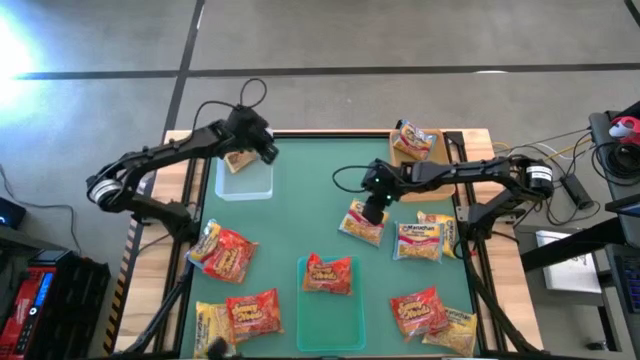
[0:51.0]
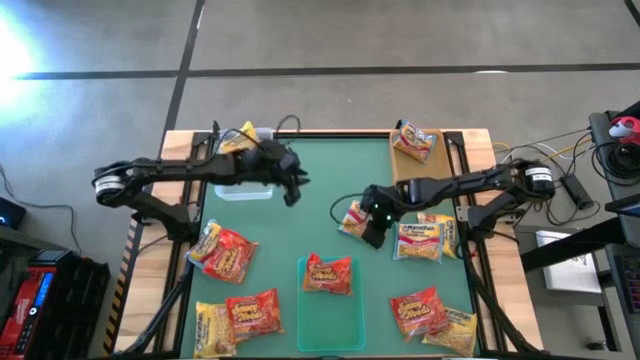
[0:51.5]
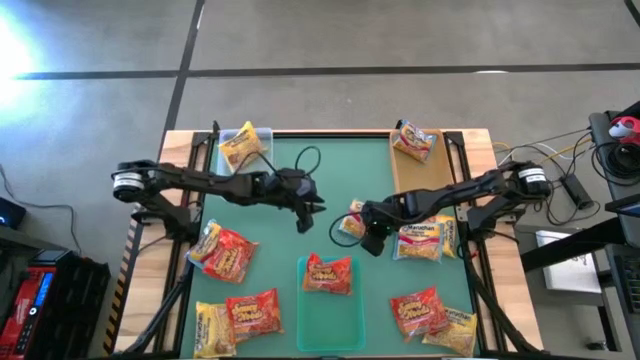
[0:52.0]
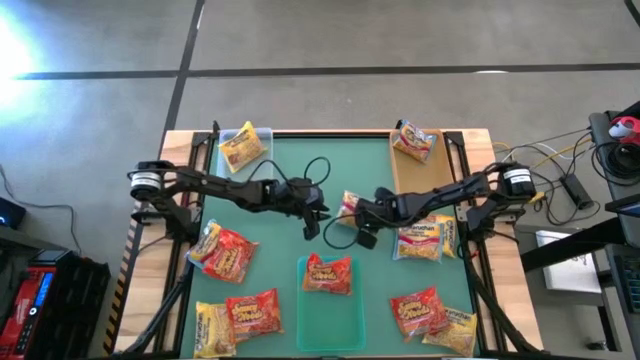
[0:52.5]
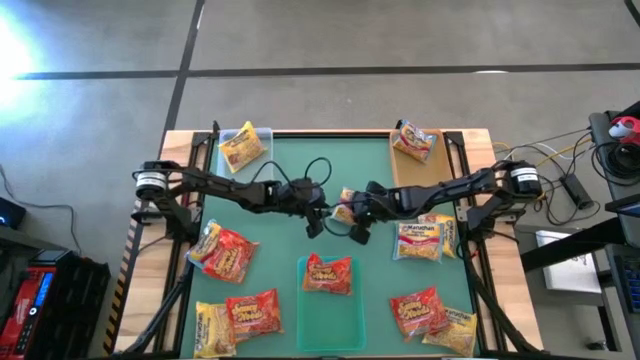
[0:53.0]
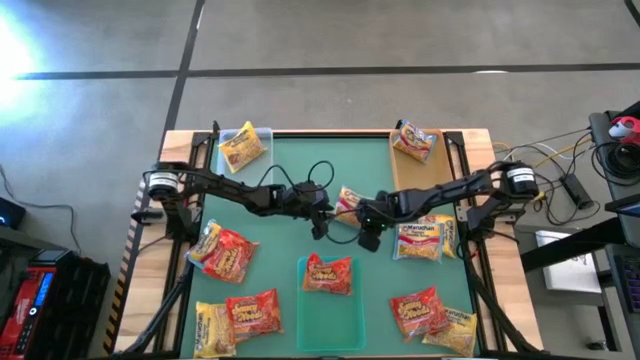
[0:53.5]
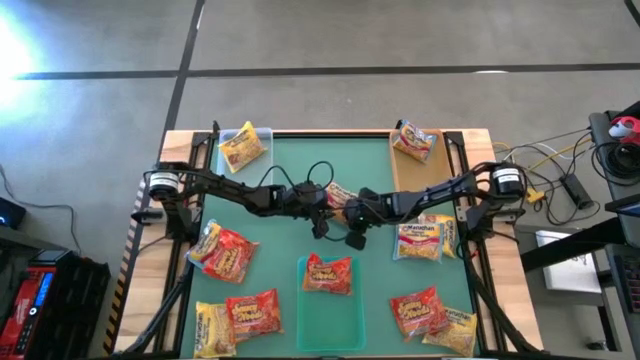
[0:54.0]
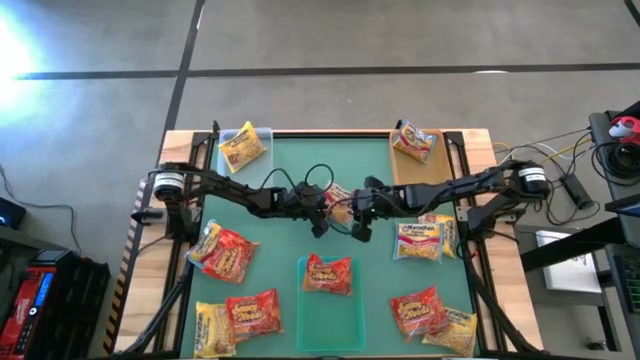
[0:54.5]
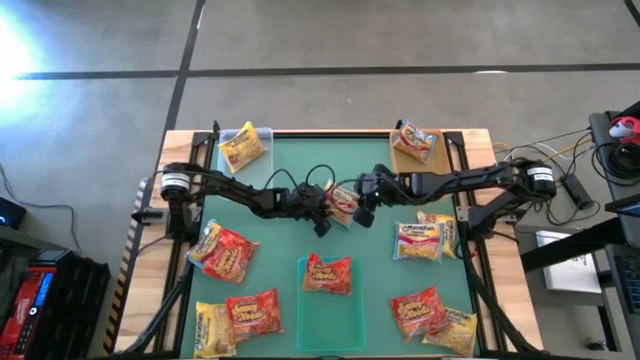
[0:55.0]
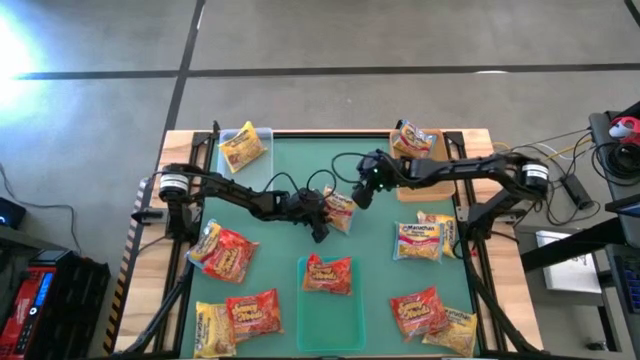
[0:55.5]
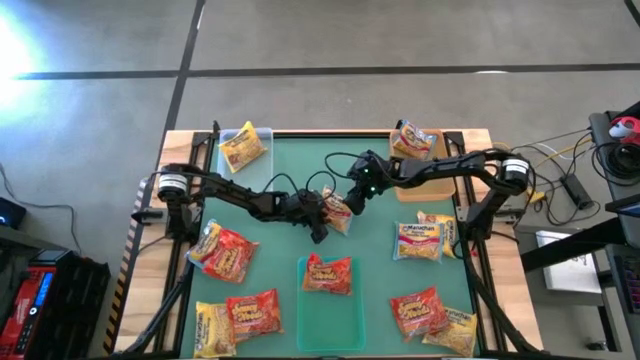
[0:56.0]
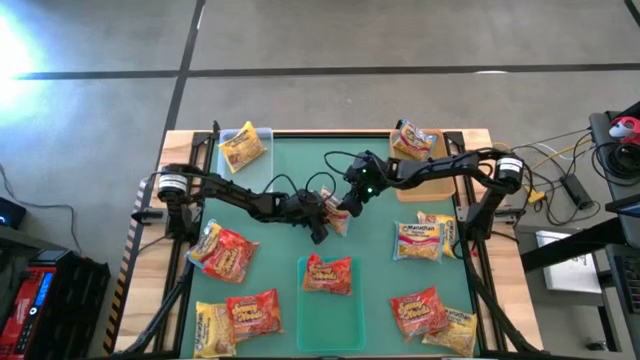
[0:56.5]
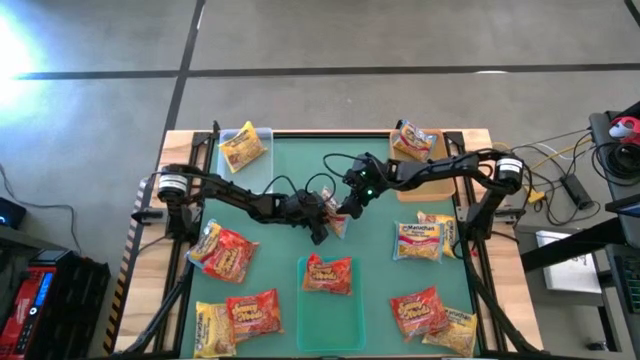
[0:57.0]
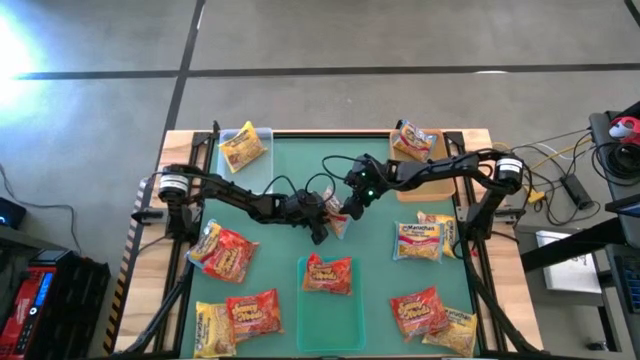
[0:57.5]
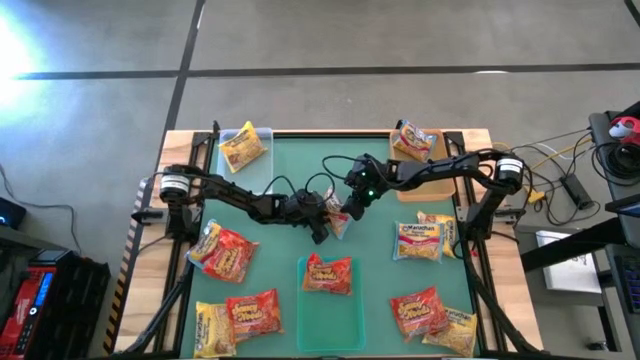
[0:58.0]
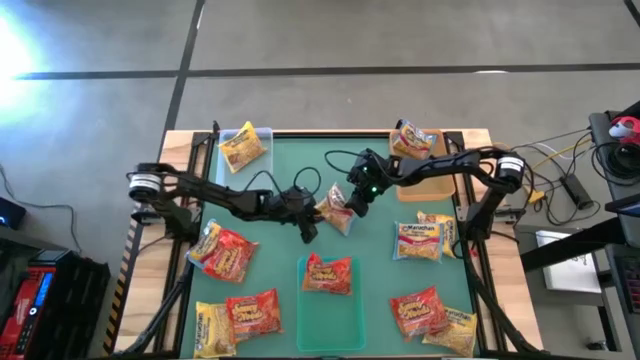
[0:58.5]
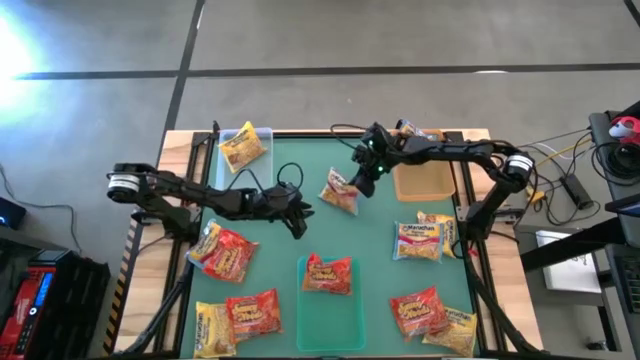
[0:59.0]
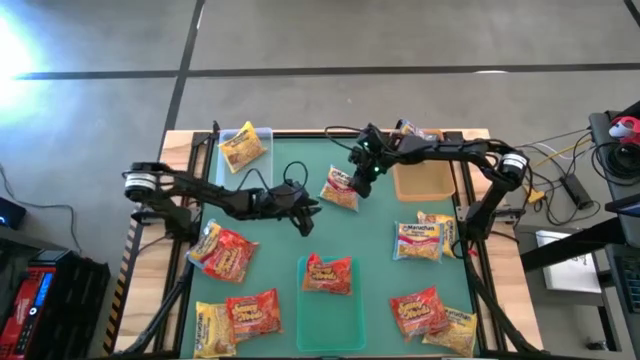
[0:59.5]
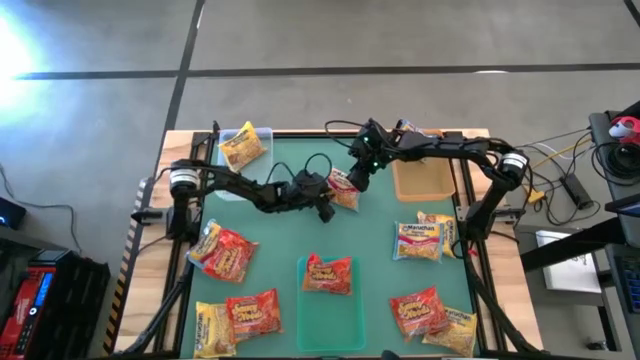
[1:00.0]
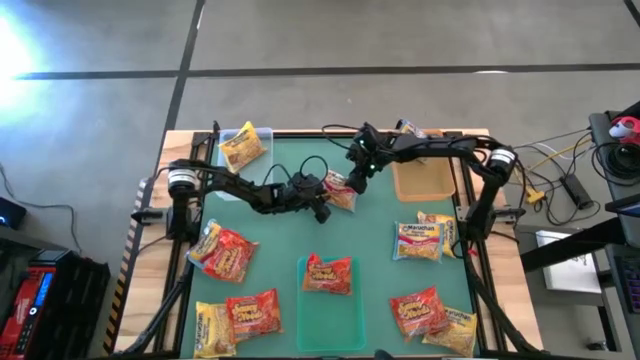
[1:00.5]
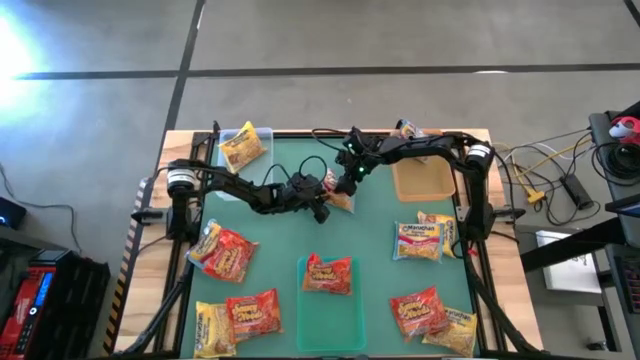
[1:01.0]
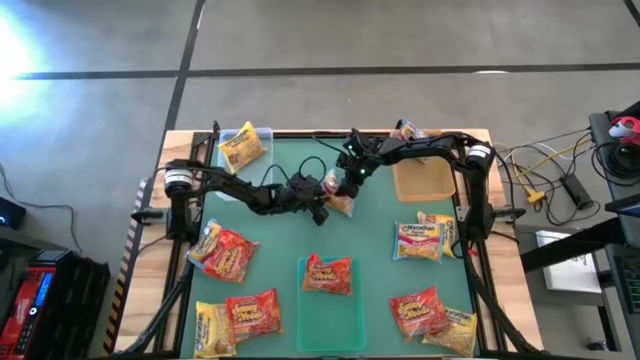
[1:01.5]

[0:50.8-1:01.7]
Task: Sort Maruchan noodles
Put the blue noodle pack into the yellow bin

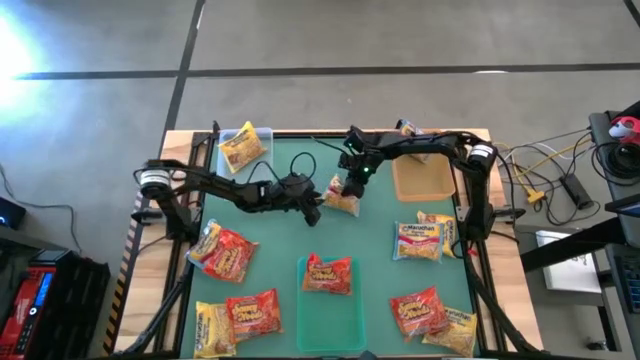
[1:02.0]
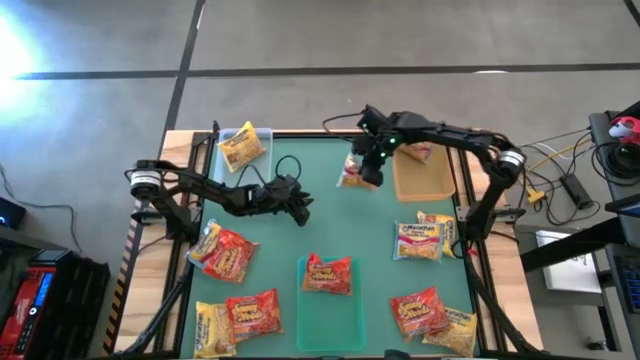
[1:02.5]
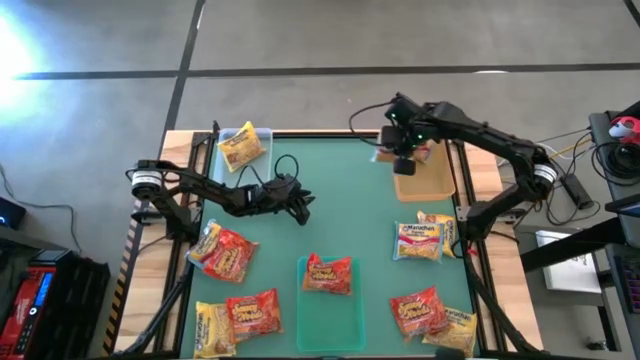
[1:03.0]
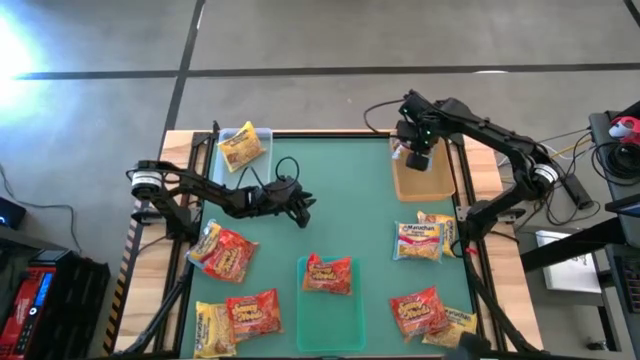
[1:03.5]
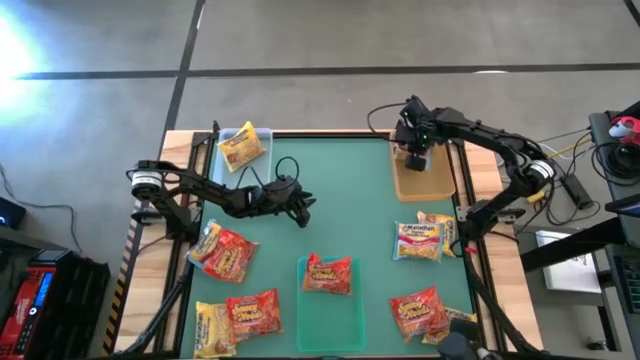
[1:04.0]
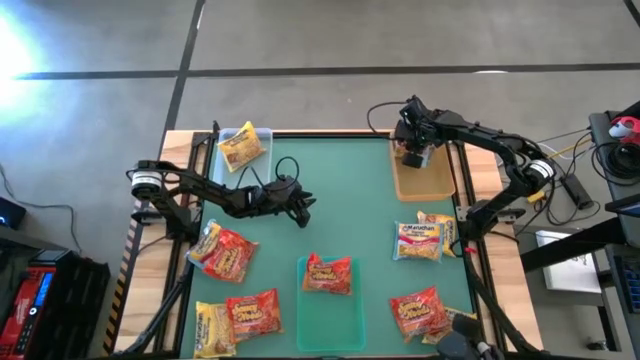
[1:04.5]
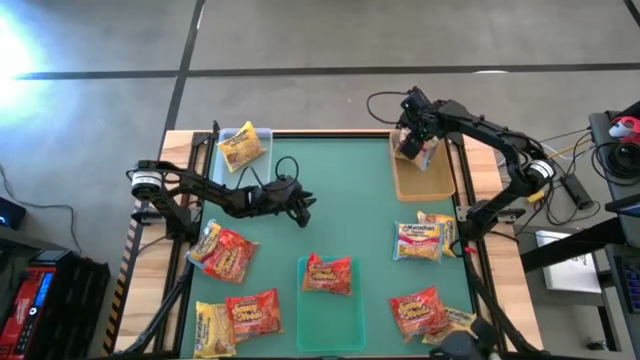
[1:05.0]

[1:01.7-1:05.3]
Put the blue noodle pack into the yellow bin

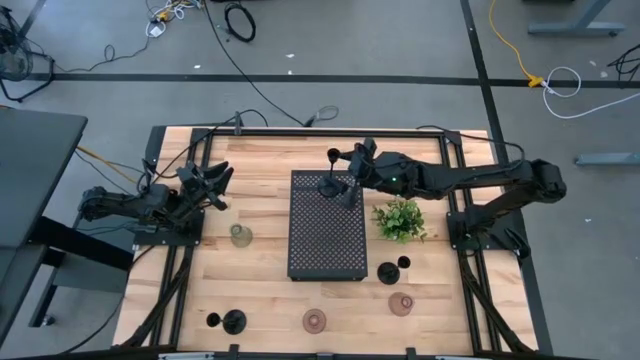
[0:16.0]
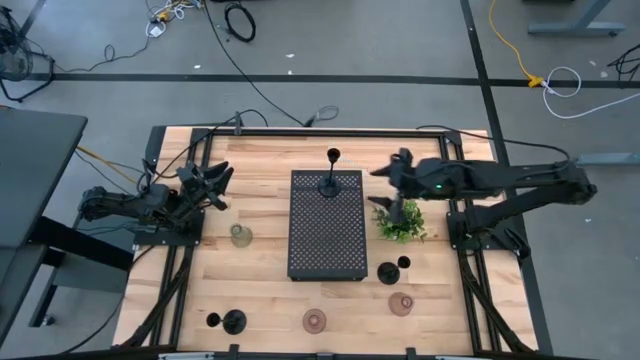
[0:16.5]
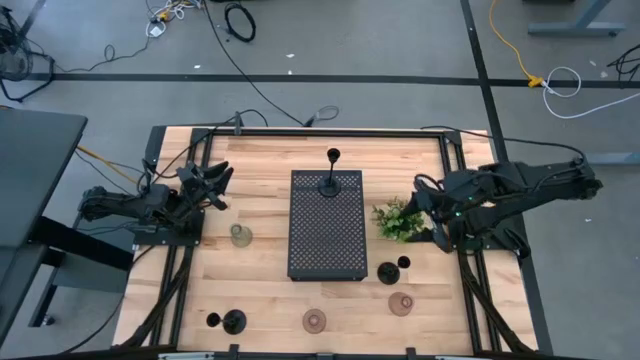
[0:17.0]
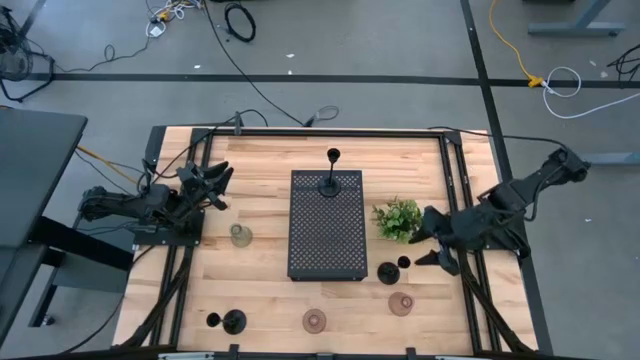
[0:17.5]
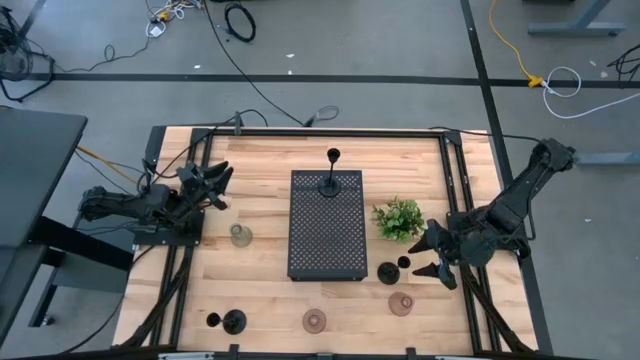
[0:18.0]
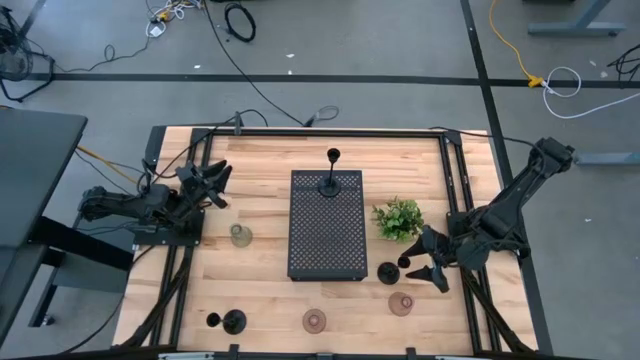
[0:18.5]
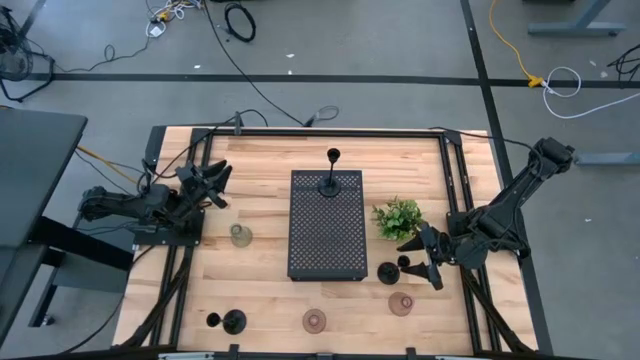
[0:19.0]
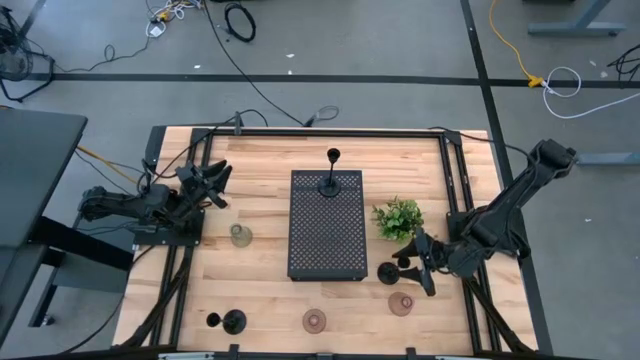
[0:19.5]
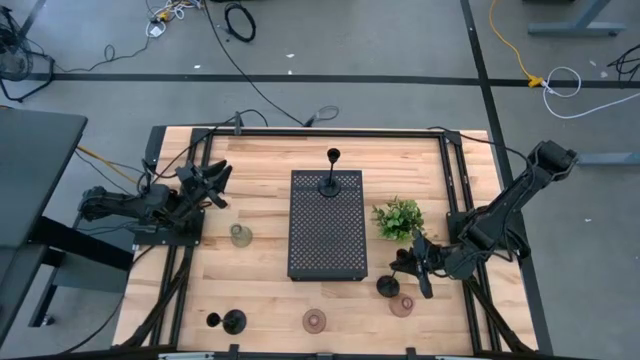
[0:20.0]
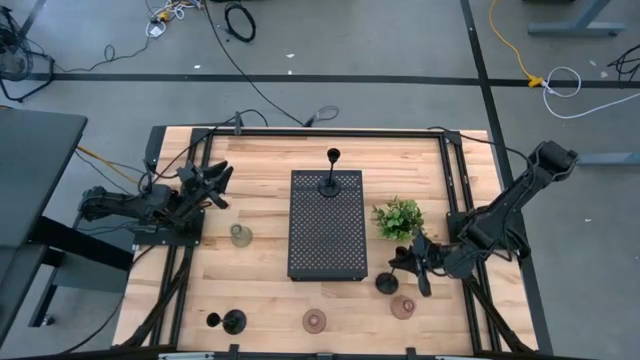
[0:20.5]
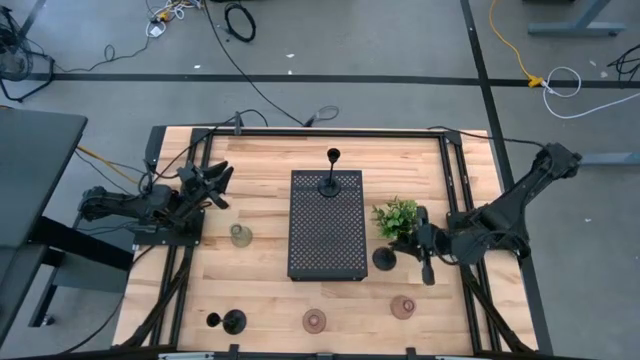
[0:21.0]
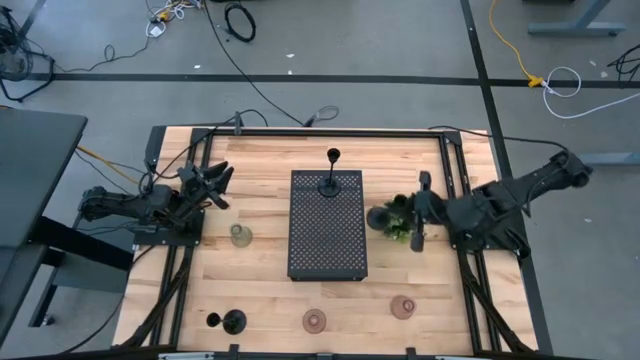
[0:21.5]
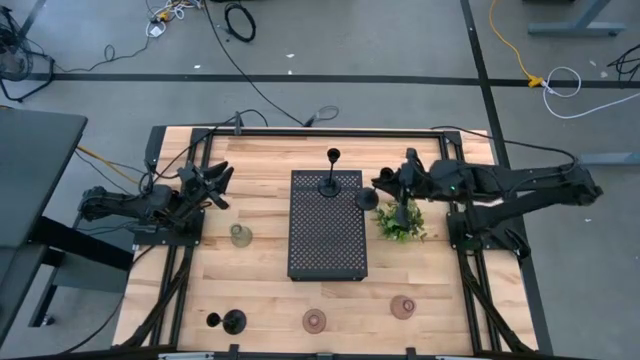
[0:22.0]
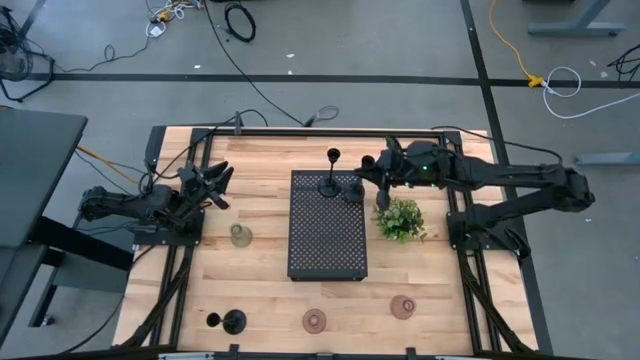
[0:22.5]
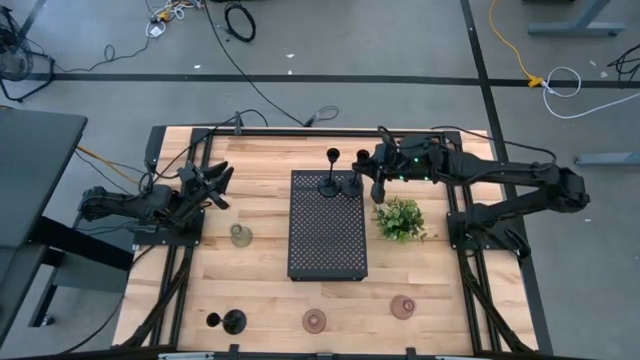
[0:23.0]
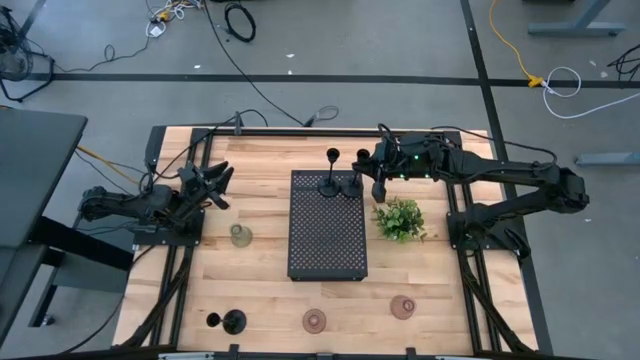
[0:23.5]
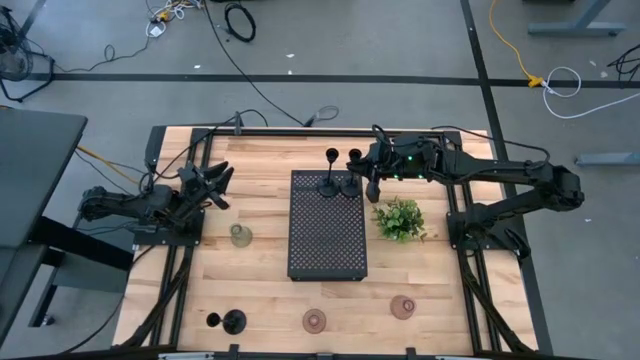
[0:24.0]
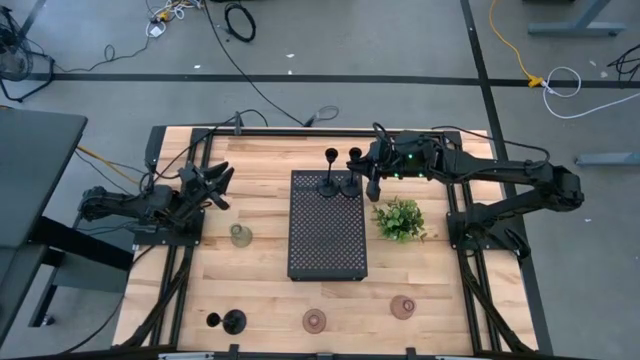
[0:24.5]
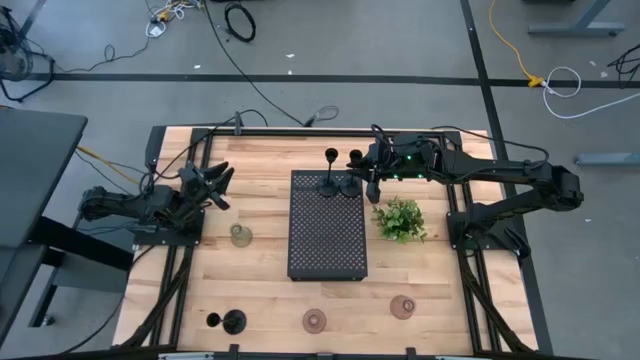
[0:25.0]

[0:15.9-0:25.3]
Task: Pick & Place candle stick holders
Put the top black candle holder on the shelf
